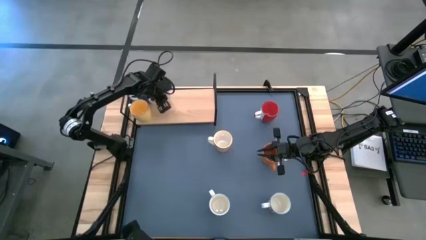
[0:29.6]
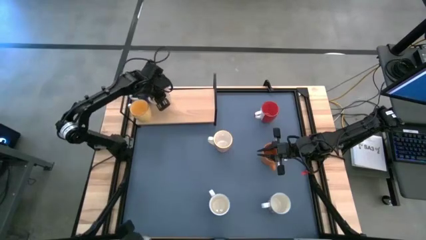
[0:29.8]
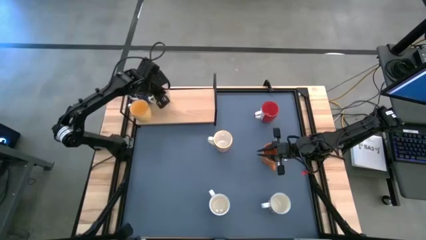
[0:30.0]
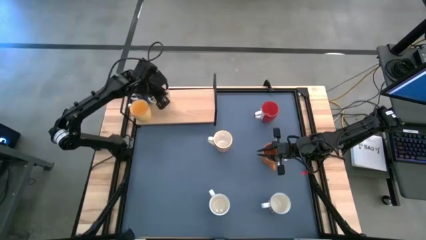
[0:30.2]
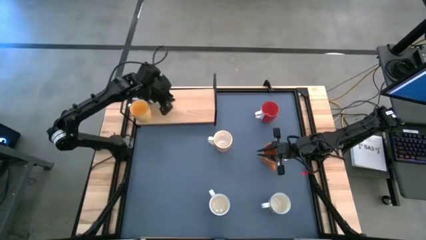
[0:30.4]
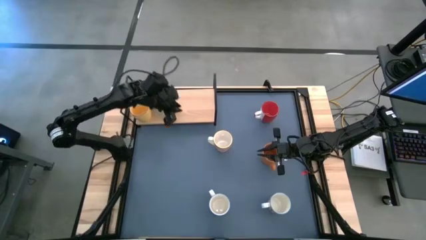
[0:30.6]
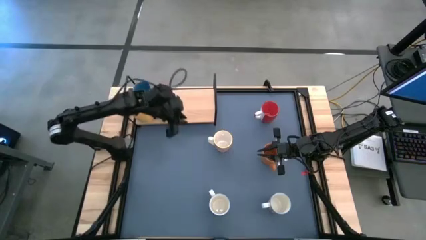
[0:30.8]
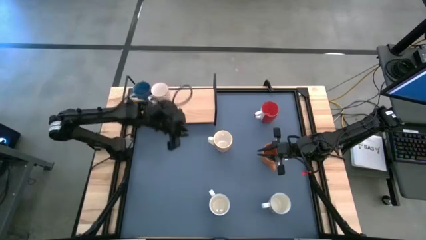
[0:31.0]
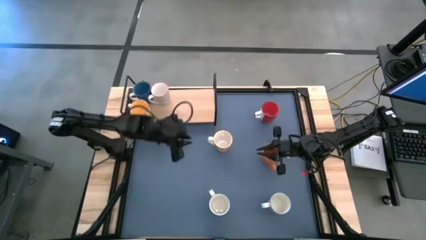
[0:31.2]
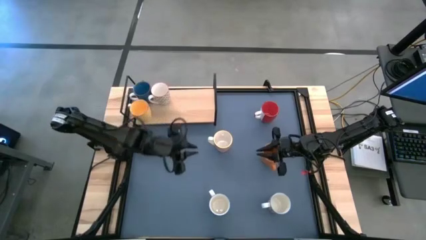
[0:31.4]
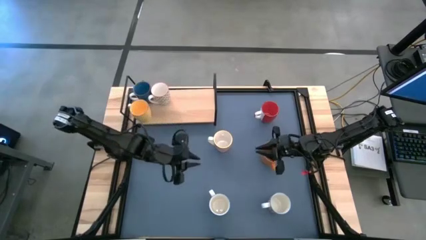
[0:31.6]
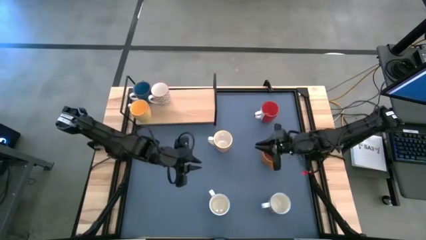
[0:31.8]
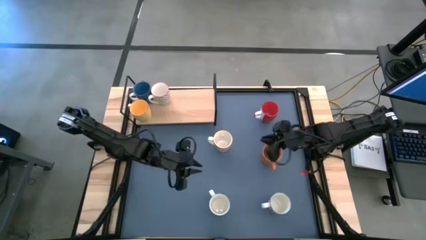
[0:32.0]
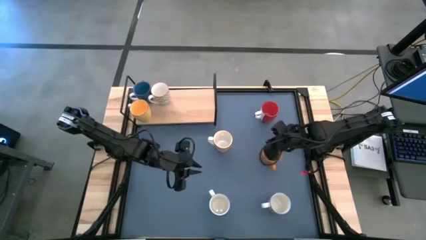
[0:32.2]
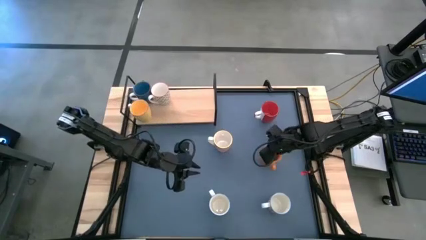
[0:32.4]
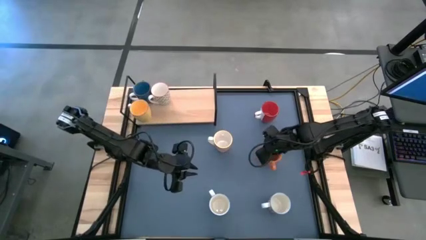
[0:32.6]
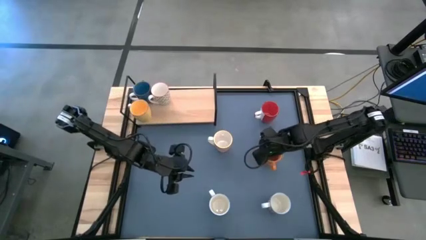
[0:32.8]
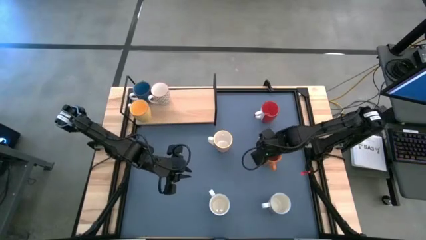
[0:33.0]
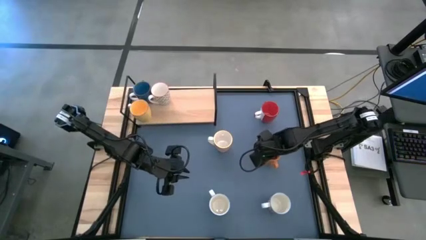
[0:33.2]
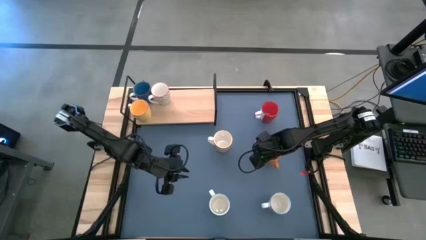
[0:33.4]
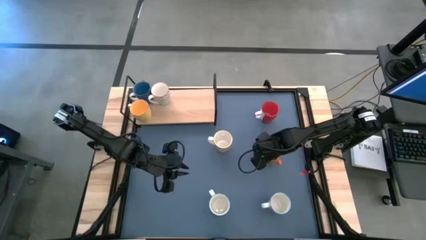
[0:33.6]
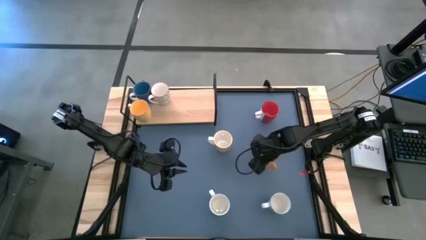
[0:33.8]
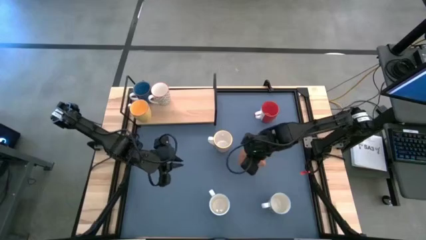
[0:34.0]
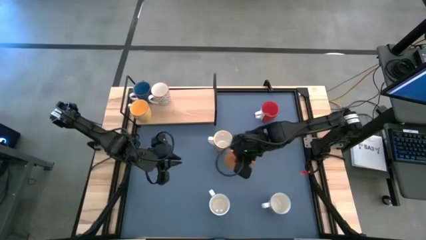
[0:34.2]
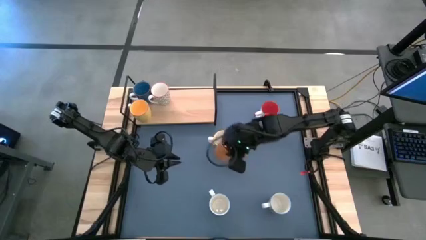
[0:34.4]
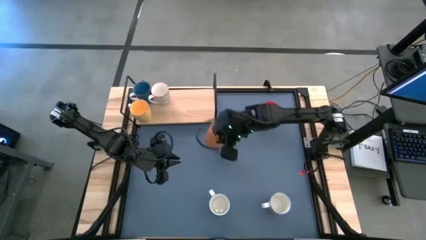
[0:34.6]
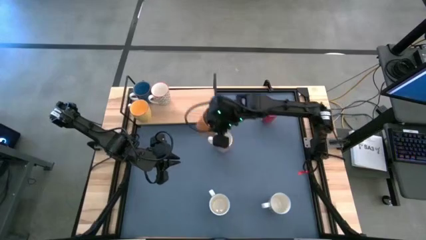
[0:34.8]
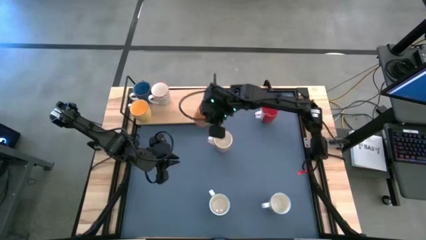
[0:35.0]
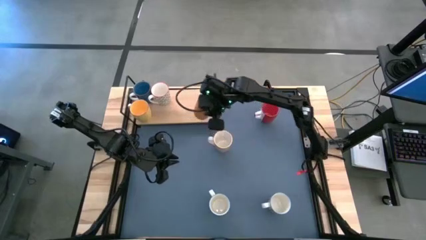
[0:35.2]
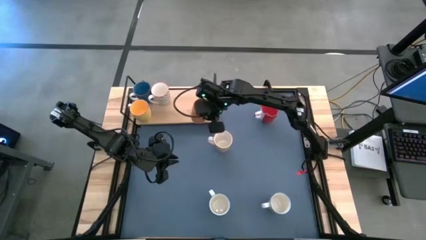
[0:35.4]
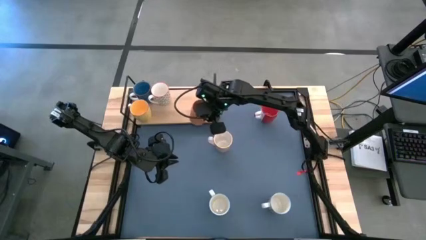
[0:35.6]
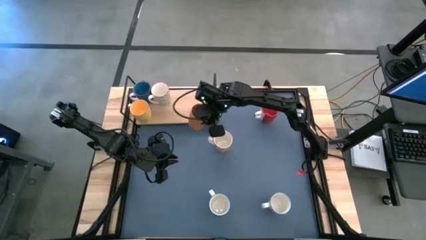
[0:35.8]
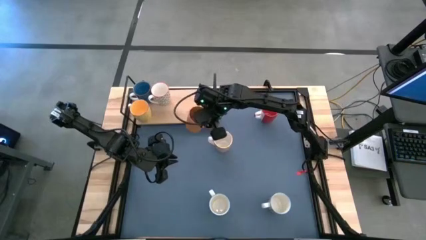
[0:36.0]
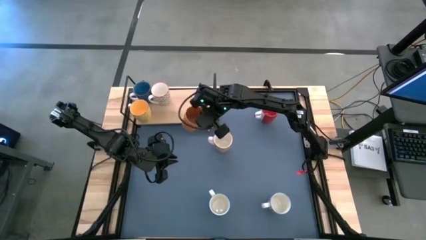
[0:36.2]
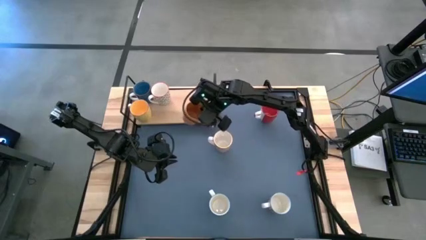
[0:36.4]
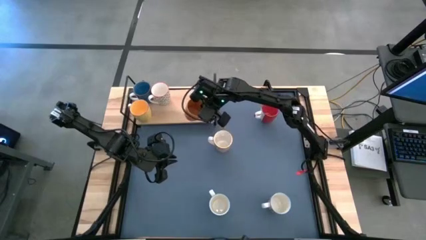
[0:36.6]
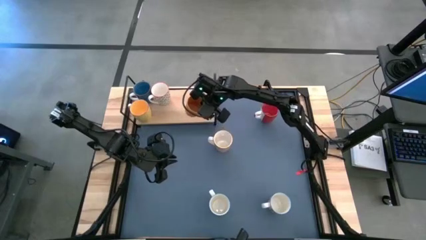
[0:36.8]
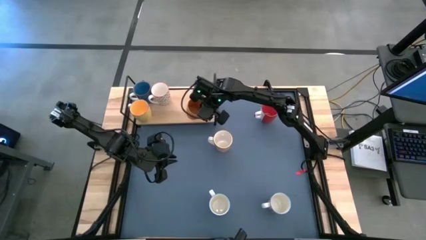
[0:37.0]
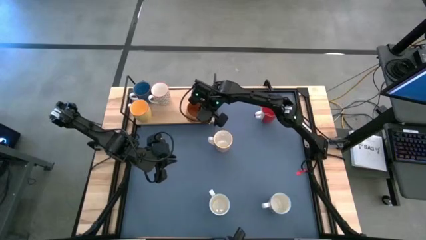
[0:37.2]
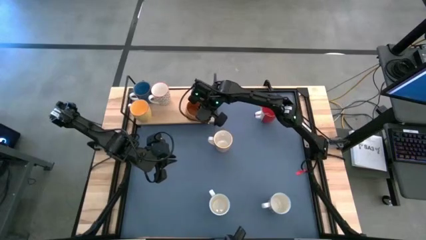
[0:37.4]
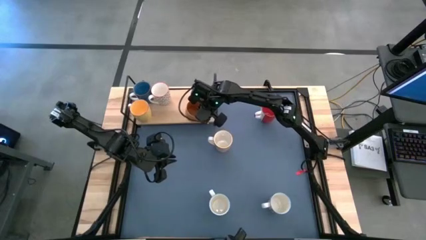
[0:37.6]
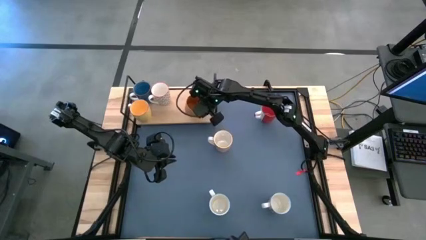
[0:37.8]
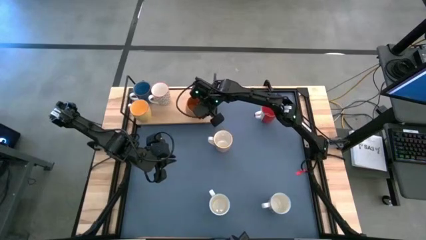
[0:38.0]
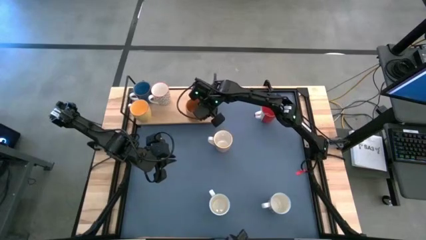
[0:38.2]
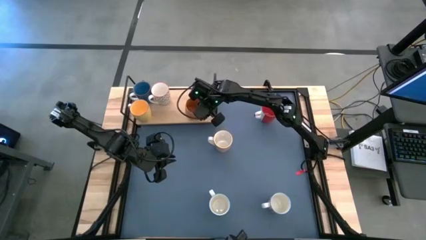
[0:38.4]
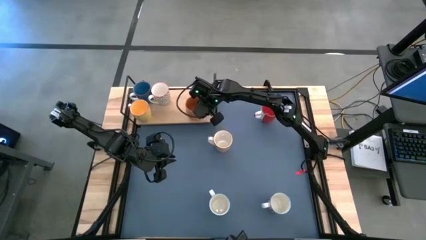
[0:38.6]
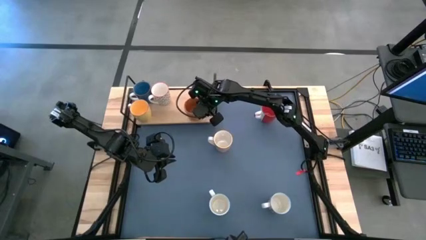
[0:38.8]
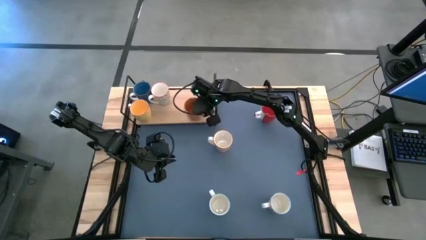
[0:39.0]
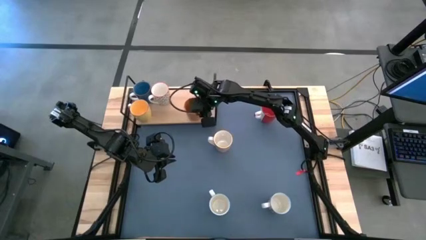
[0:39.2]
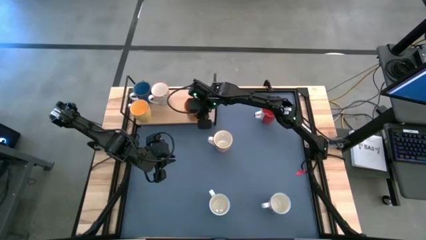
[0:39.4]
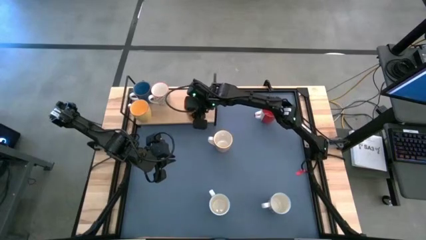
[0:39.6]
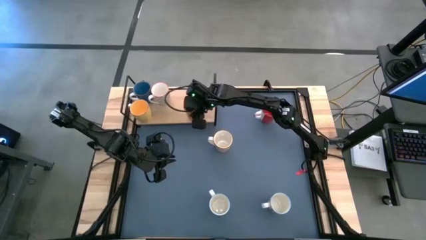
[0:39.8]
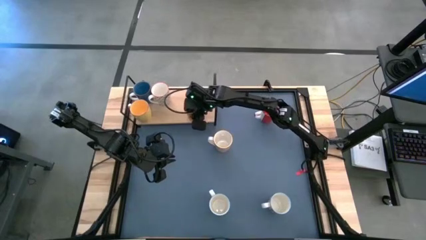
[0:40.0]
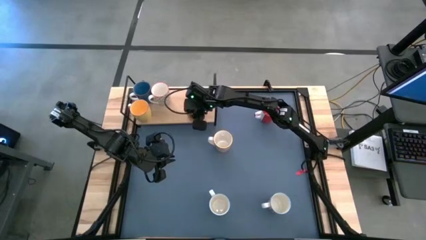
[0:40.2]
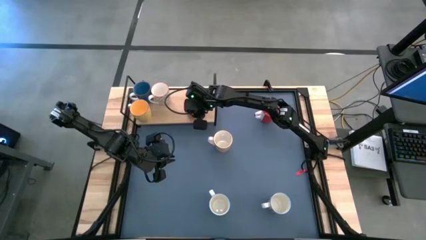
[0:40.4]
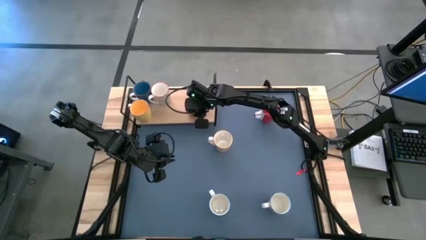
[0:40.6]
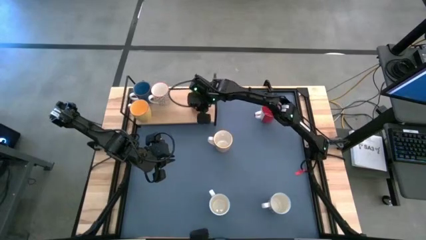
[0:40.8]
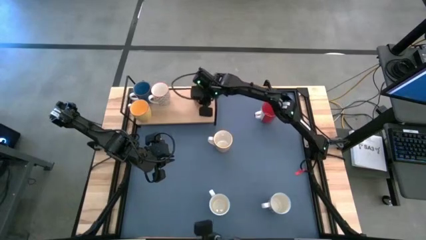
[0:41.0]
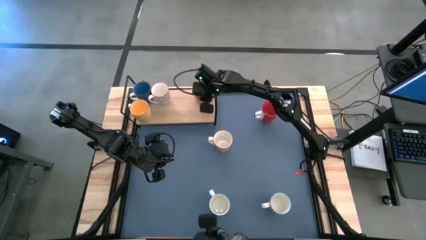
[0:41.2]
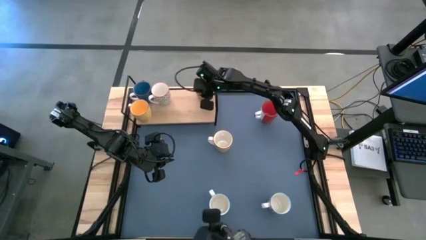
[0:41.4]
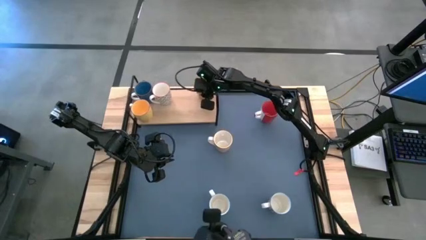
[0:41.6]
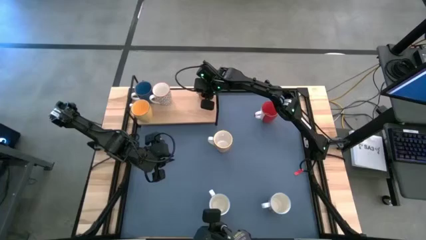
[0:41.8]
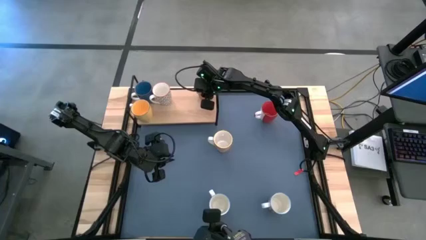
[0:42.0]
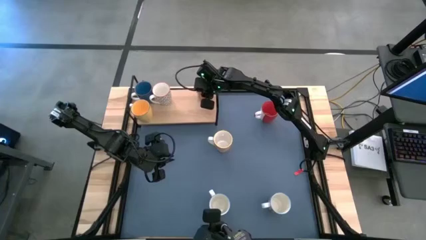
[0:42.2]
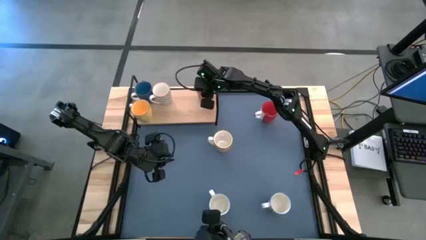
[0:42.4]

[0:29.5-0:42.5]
Task: Place coffee mugs
Put the light orange mug on the shelf

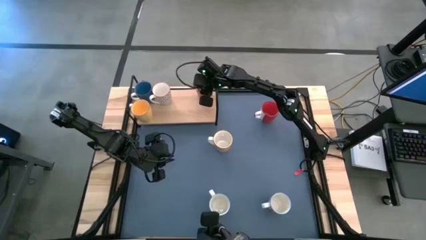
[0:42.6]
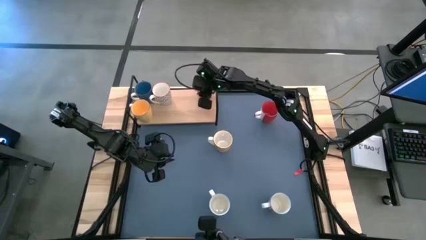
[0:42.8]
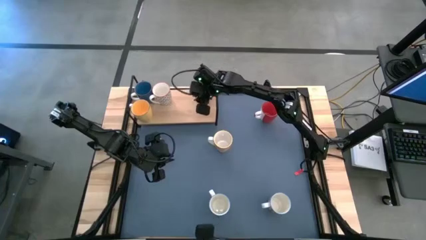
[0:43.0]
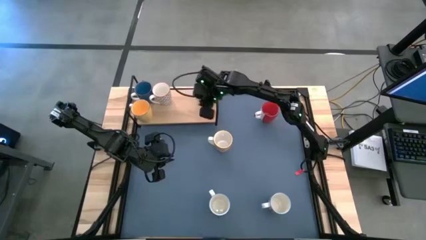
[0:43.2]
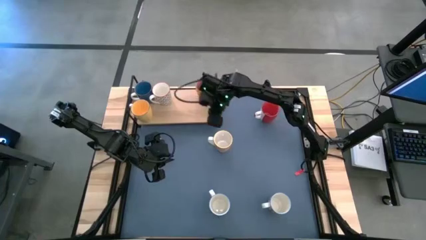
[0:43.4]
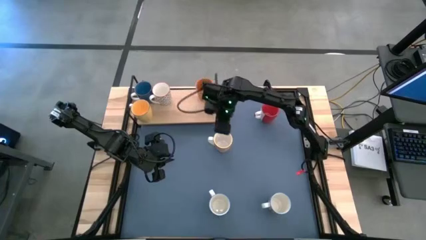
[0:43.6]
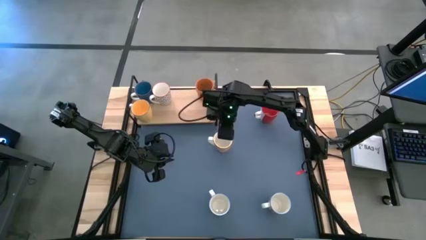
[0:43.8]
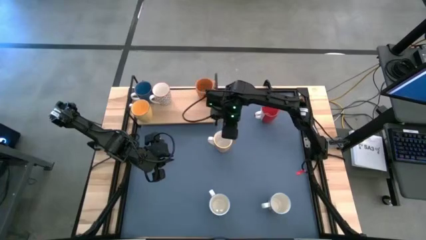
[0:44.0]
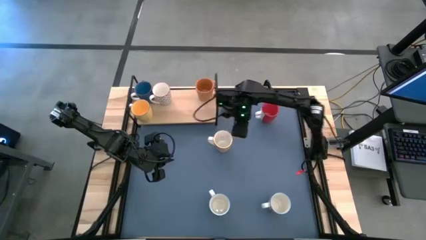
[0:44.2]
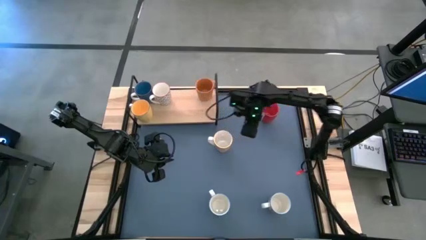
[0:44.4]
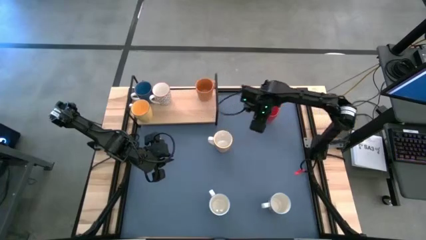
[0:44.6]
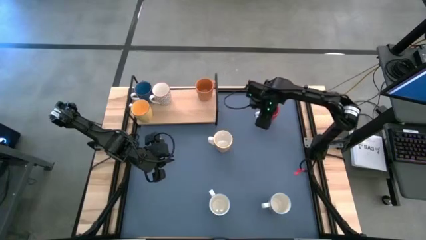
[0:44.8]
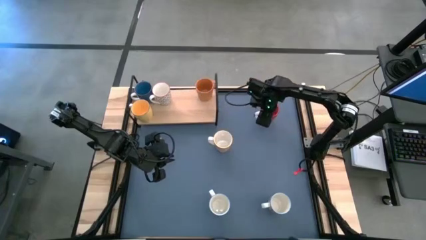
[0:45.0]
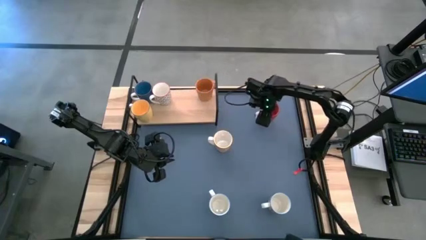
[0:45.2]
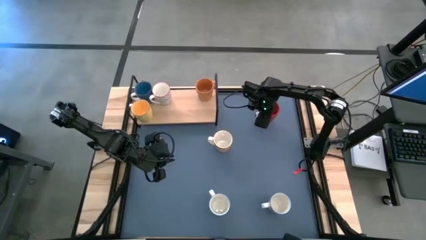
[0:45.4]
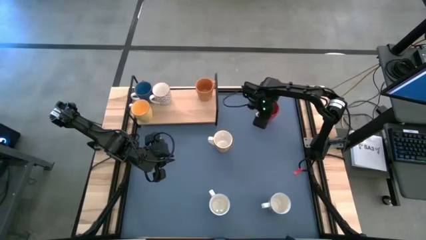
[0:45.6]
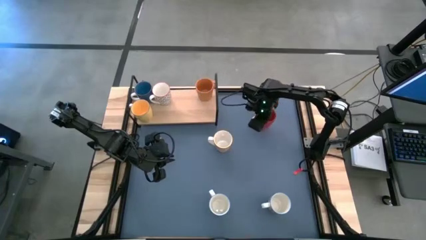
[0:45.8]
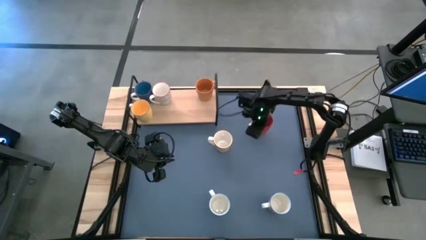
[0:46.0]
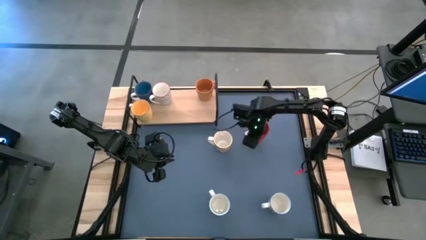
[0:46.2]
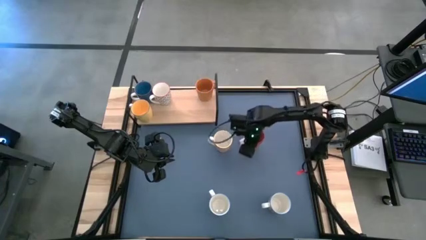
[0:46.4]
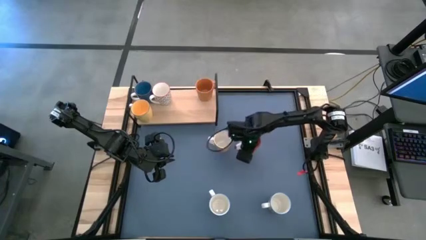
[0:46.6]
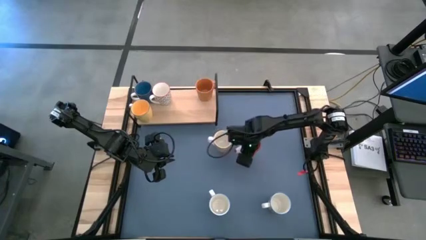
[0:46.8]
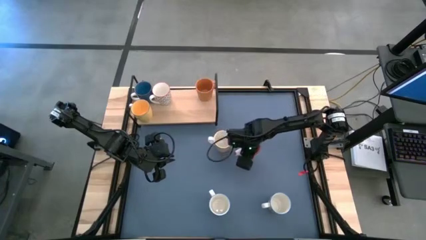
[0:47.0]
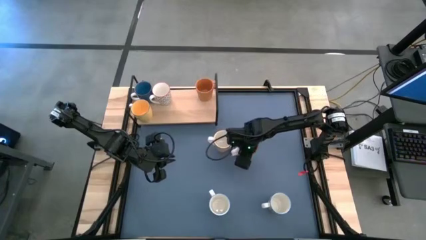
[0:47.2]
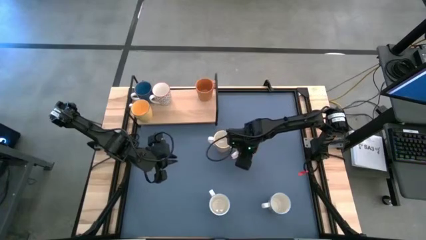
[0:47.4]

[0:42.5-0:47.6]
Move the red mug to the middle right
